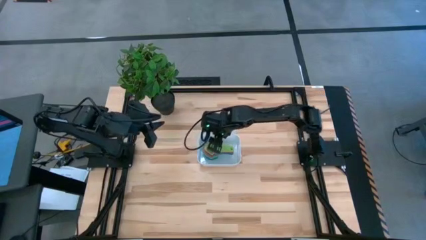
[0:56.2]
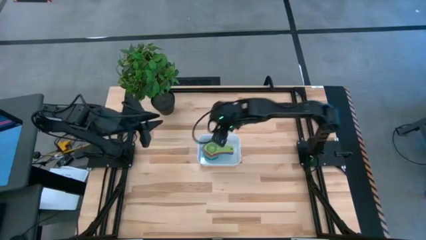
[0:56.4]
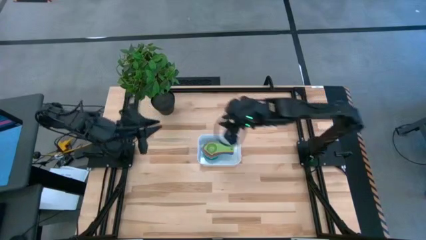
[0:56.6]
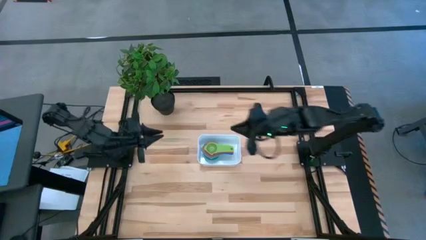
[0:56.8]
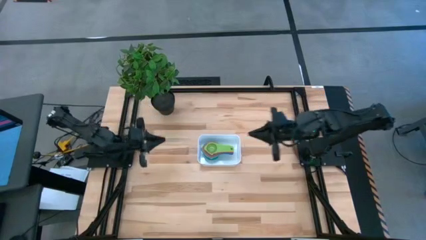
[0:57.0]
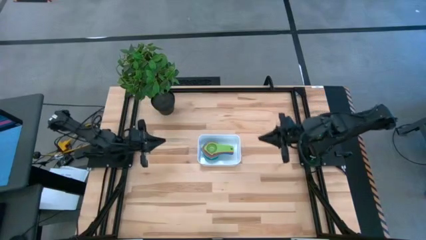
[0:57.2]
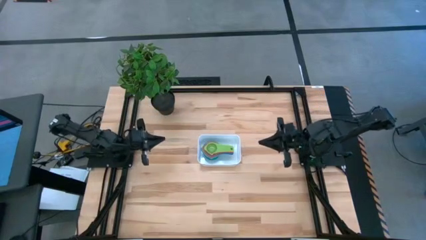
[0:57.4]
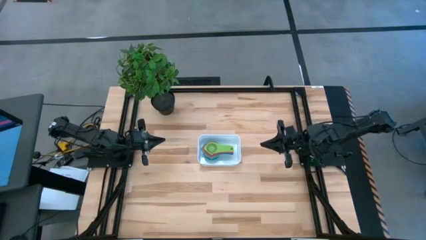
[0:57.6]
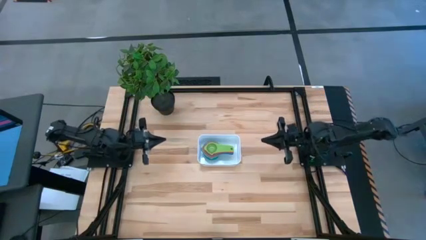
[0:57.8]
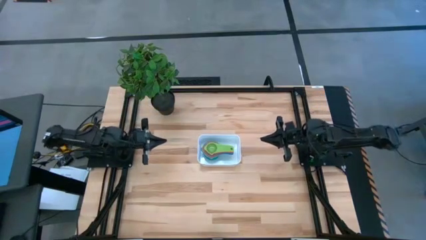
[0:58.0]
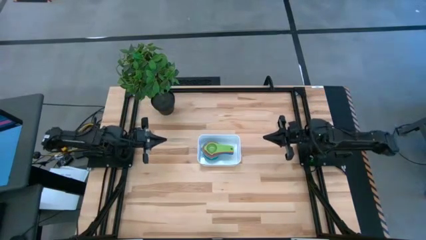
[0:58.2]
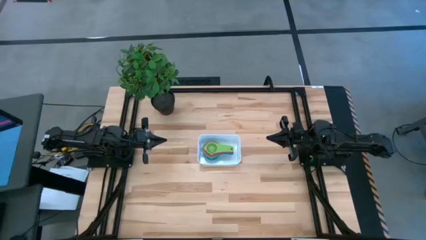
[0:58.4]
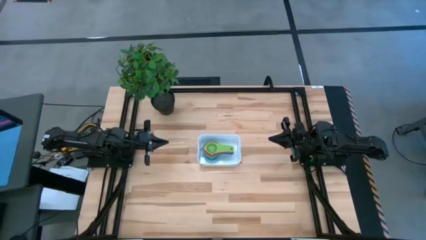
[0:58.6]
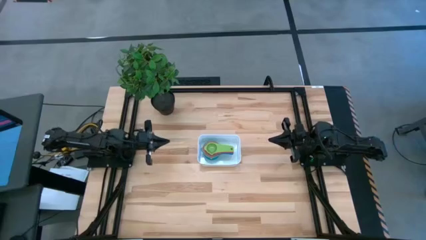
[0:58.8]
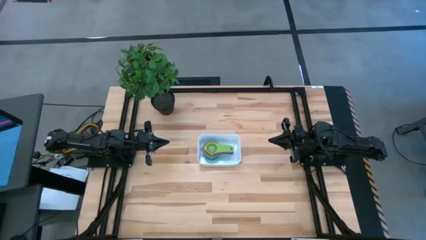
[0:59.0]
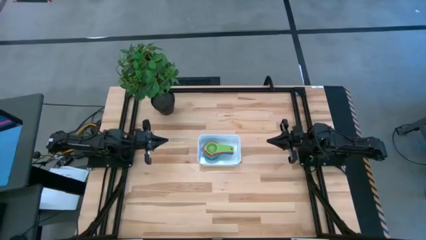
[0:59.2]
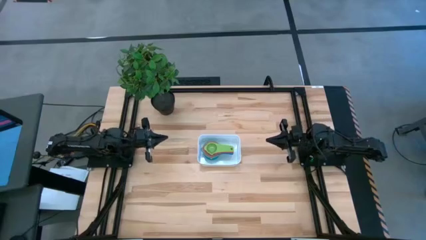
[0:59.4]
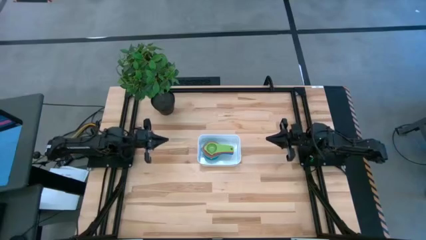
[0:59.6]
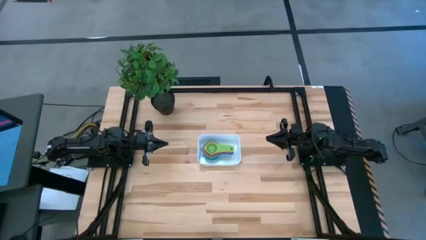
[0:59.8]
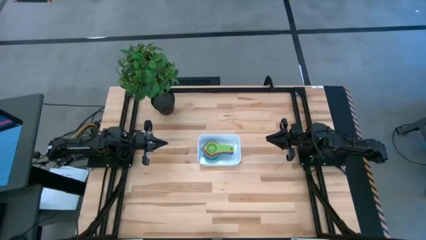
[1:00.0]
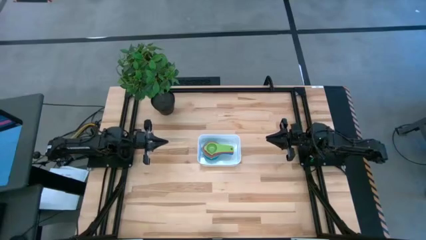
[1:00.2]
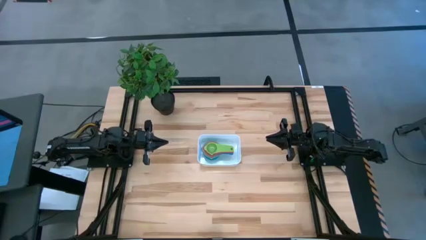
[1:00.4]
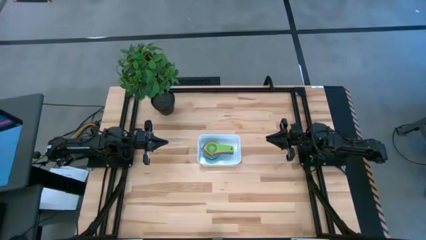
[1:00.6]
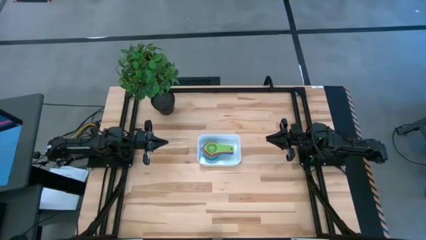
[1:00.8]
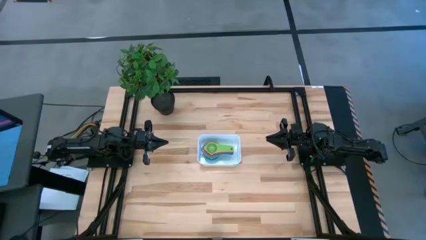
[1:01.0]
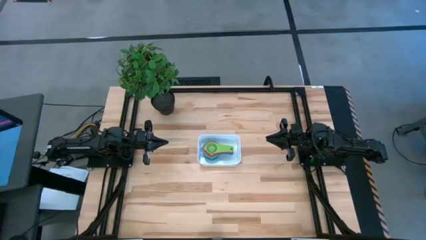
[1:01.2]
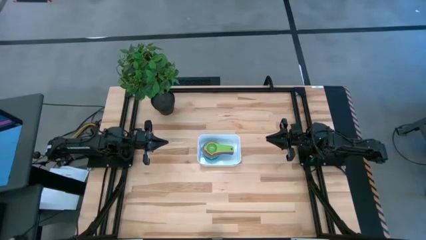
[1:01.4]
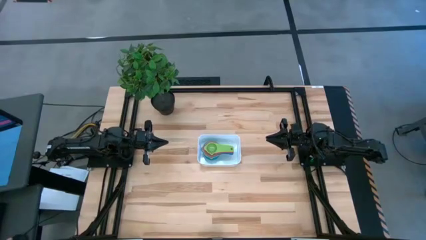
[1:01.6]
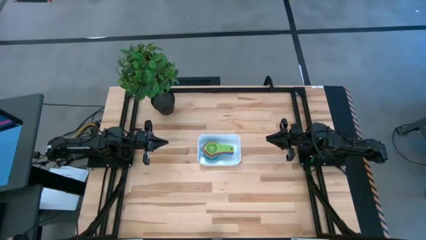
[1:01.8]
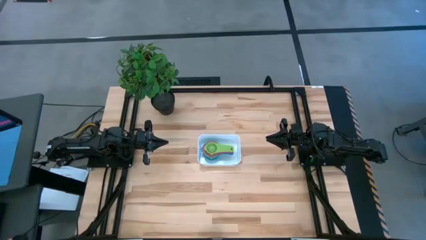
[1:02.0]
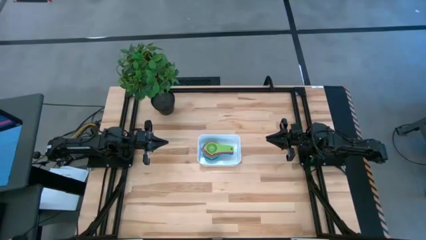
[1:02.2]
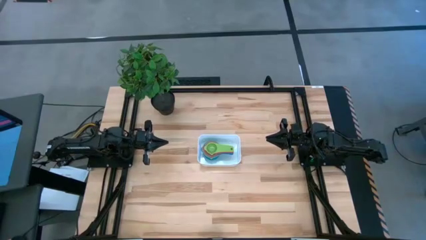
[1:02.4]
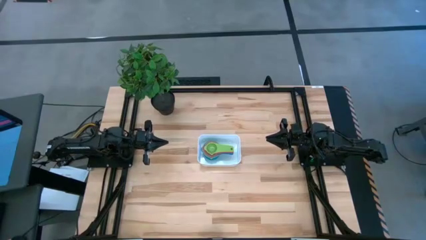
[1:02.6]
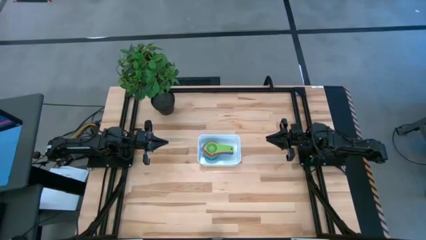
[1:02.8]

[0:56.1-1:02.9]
Task: Nest measuring cups in basket
Return to Home Position

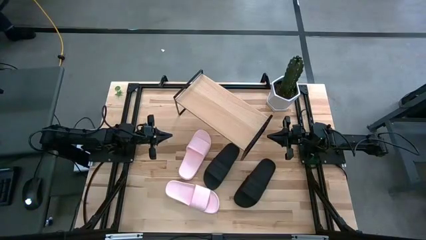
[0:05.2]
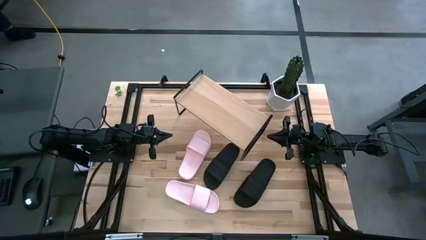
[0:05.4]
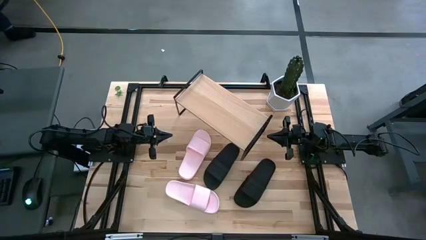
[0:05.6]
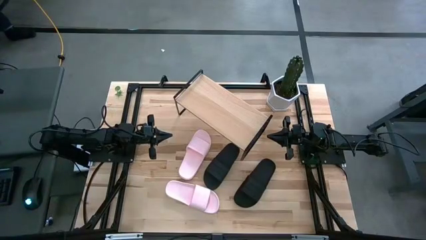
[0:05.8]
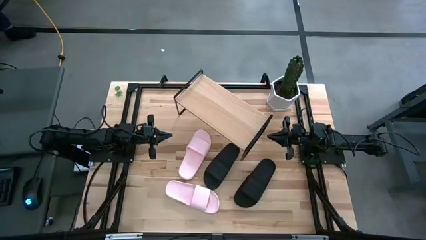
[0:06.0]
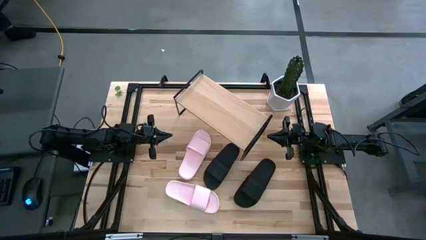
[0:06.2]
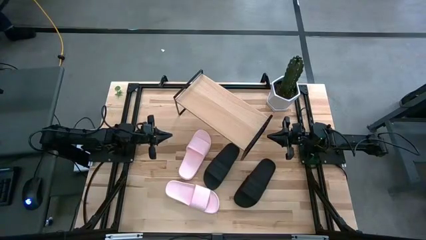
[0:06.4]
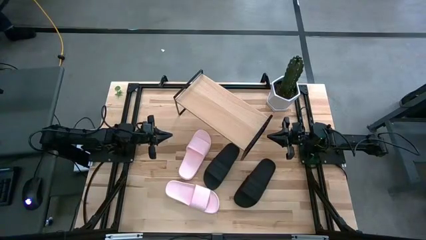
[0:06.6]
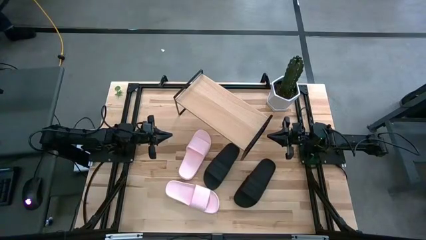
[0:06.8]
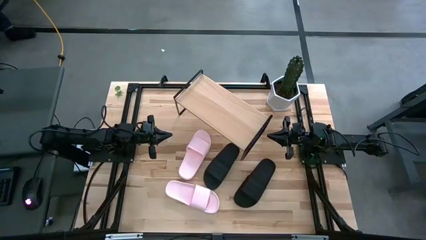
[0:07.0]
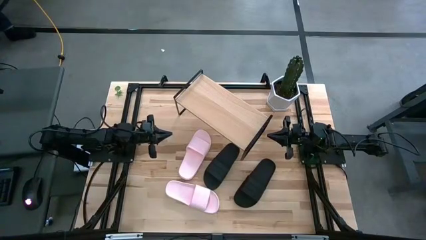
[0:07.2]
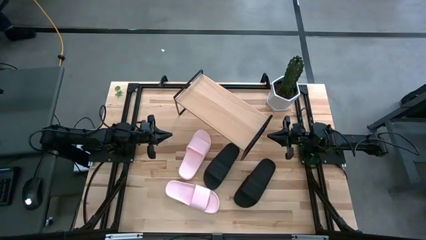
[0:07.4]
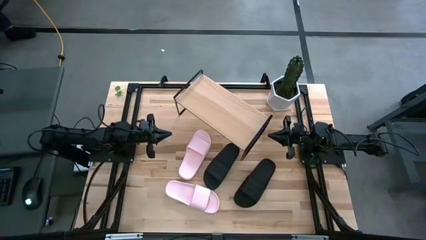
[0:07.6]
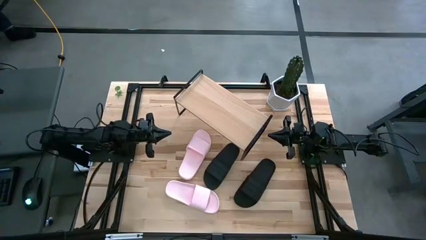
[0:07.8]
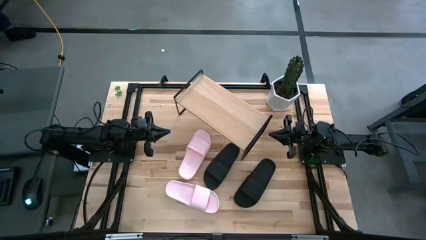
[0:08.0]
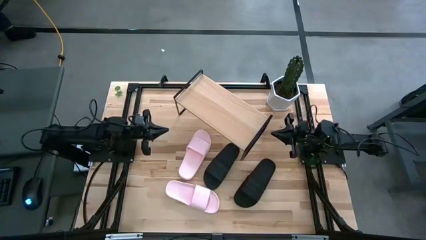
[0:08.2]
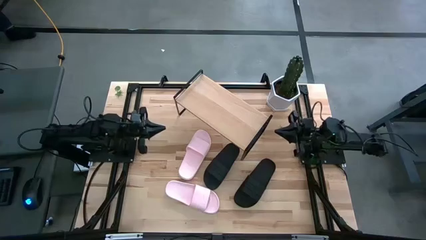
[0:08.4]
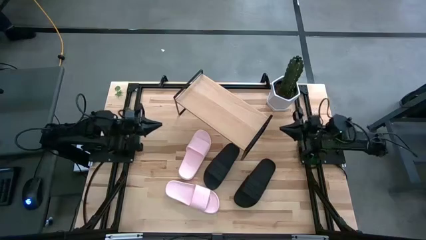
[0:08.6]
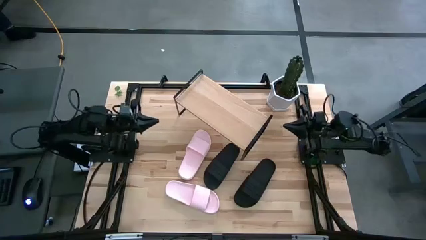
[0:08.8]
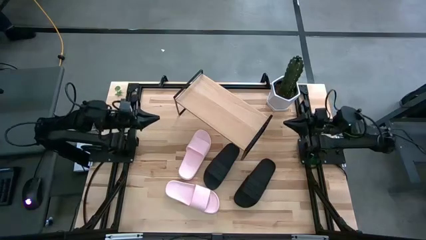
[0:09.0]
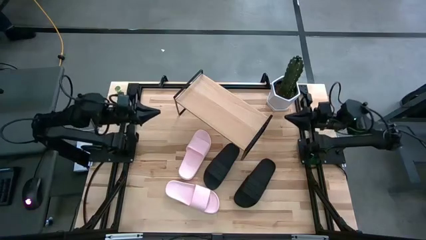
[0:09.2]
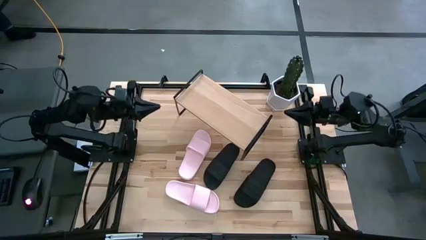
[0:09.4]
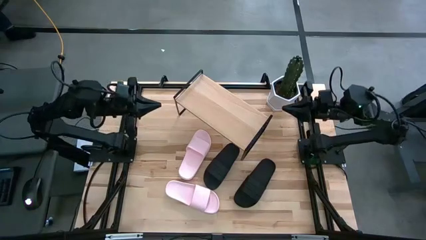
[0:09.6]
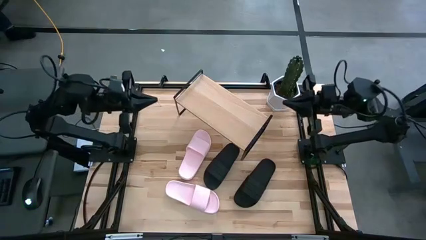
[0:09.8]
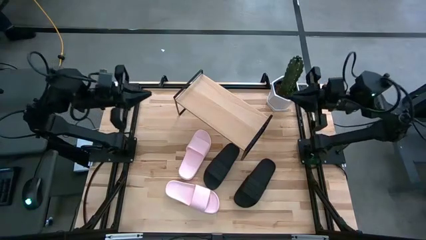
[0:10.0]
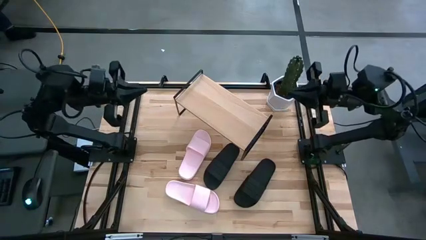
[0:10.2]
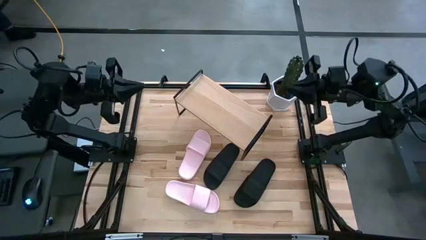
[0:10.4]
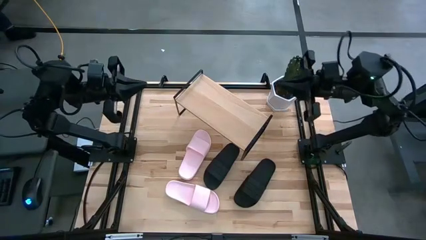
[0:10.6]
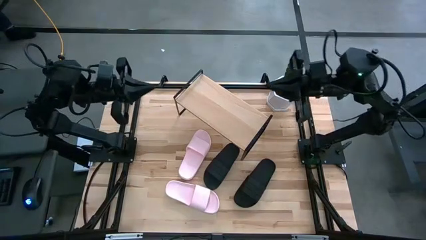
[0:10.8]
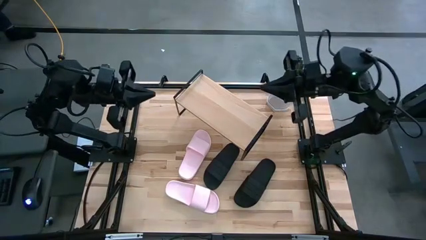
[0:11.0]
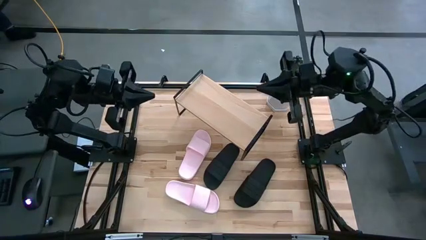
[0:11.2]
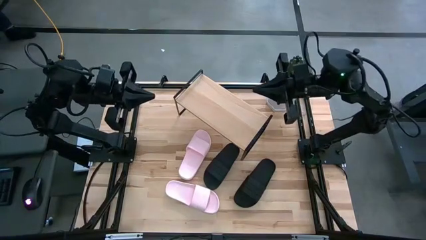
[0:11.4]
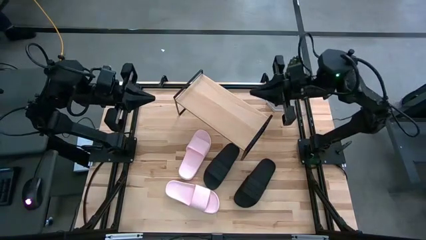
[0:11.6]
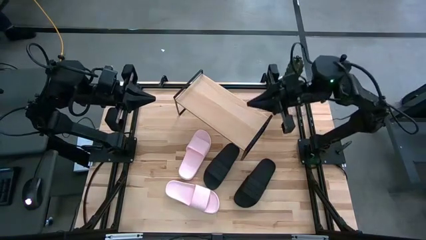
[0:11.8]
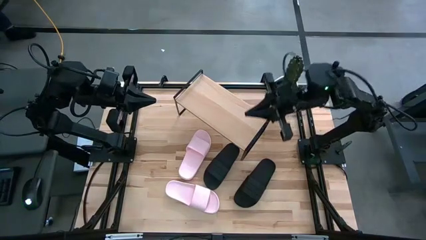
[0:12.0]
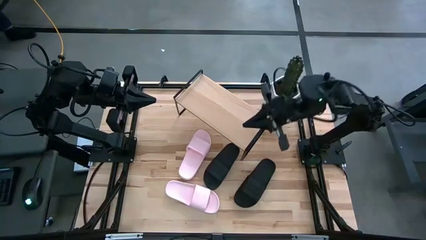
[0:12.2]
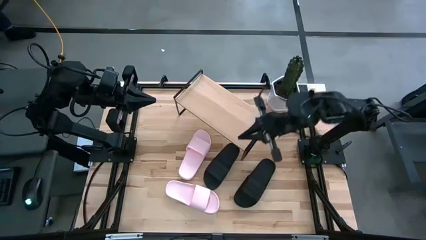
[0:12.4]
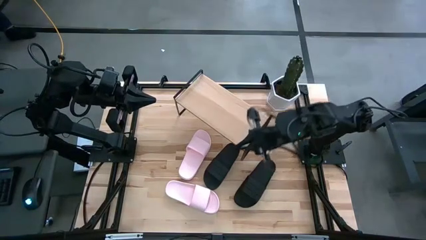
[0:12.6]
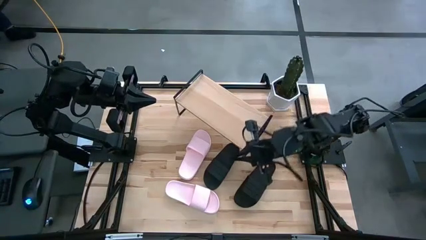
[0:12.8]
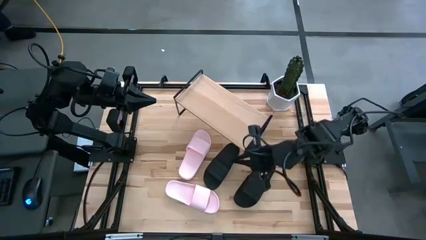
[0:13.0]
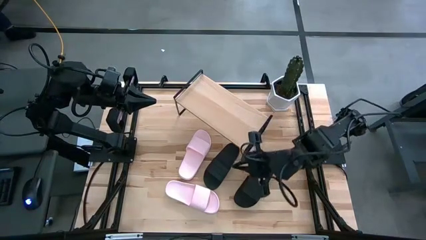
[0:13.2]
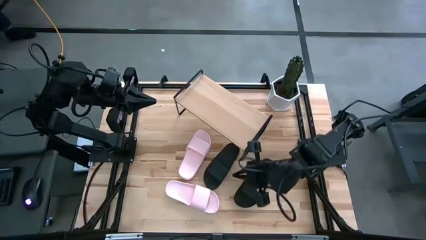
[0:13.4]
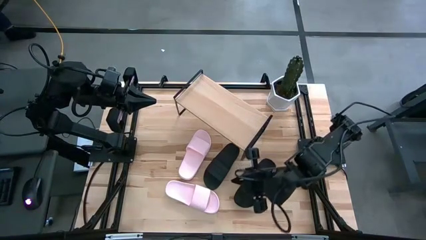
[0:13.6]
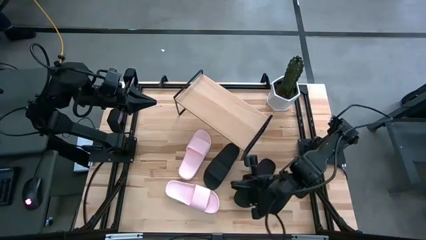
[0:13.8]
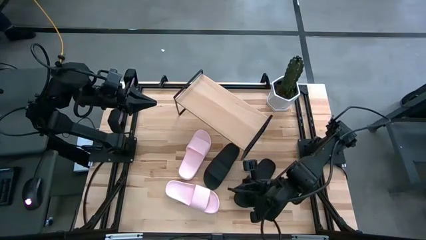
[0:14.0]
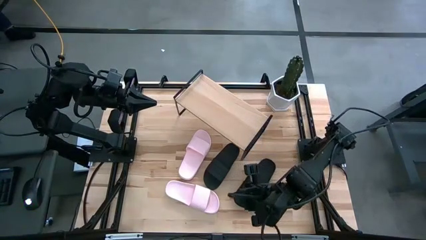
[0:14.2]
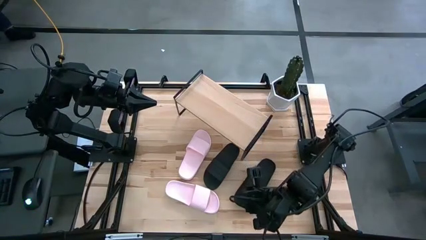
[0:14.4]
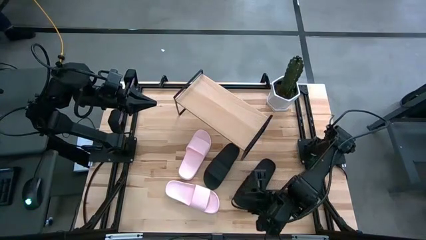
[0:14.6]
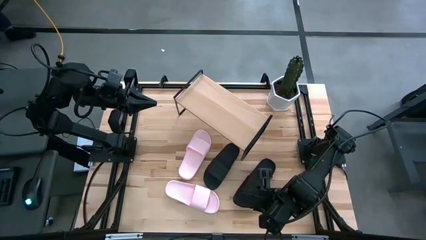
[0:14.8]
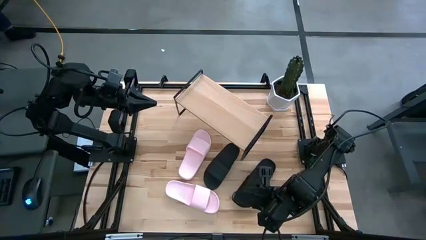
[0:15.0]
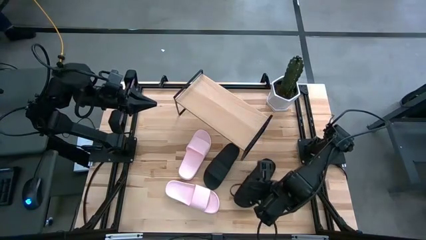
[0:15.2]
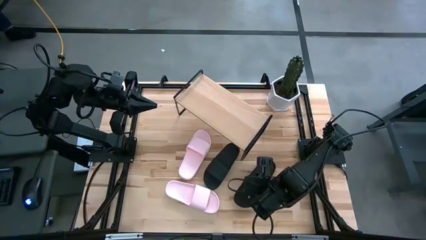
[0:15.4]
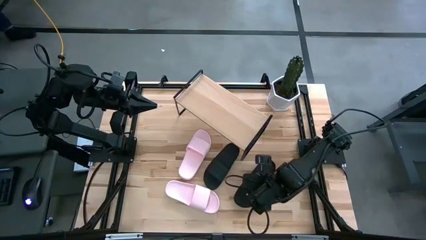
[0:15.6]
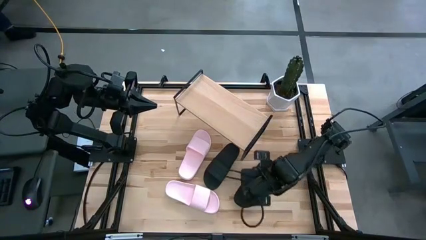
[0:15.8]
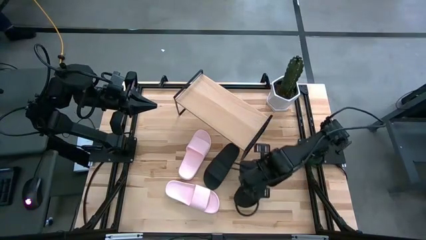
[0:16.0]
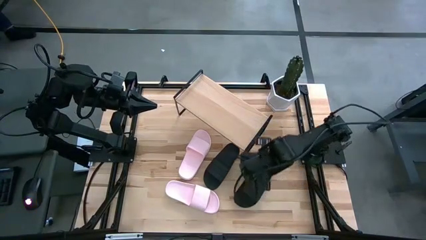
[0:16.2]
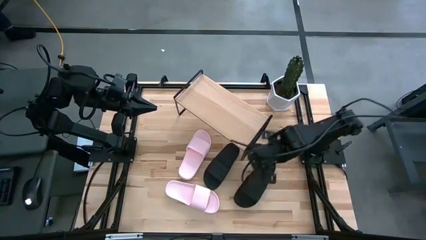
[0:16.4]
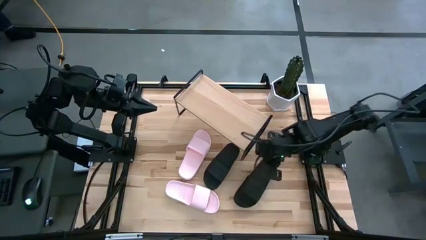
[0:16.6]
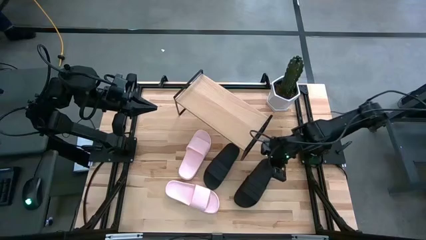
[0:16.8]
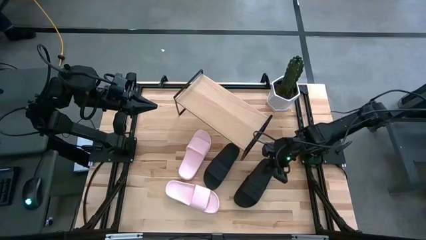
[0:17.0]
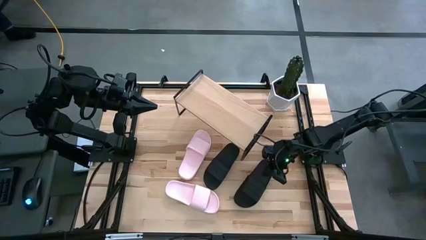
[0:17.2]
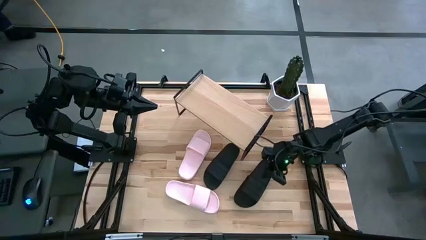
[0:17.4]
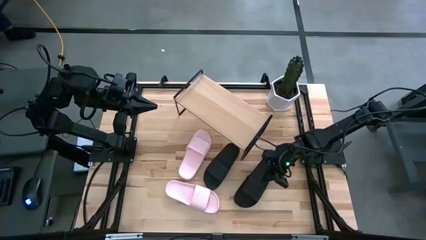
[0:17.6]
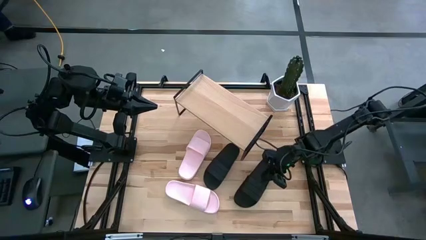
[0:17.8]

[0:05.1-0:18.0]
Task: Pick and place slides into the shelf
Put the right black slipper on the shelf
